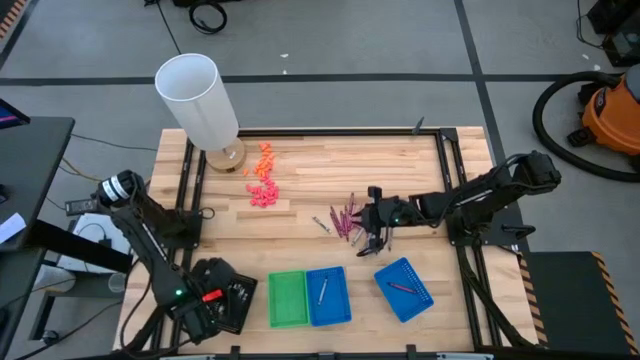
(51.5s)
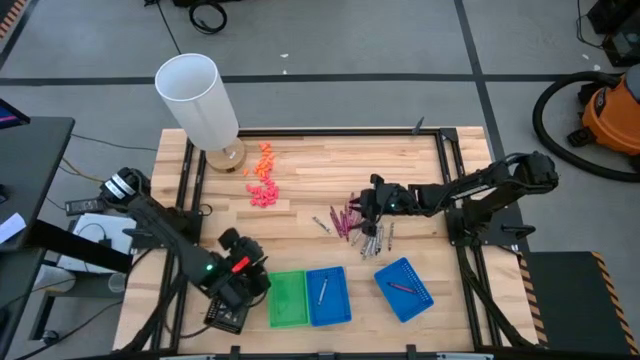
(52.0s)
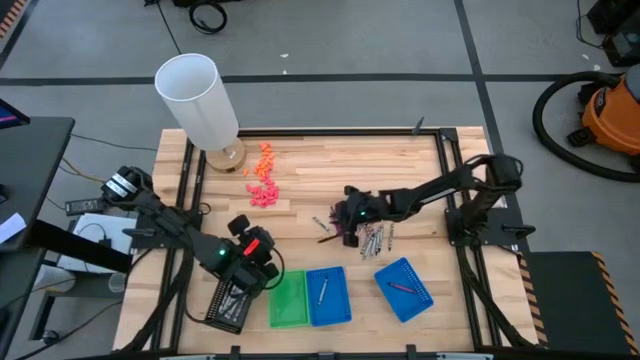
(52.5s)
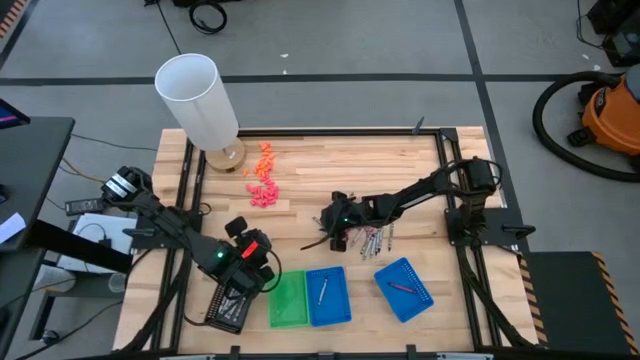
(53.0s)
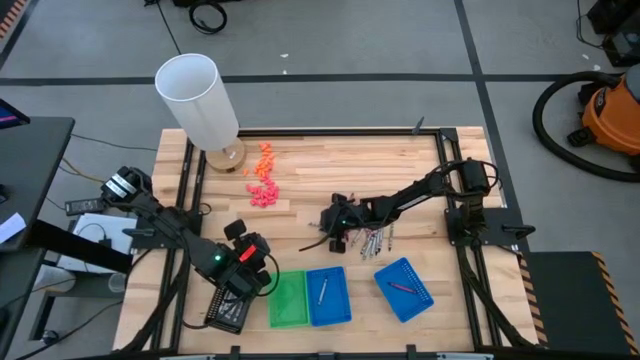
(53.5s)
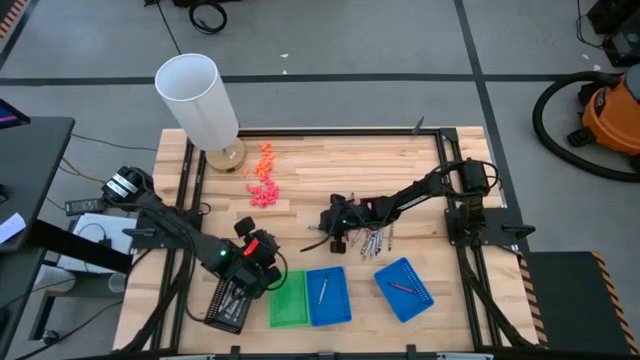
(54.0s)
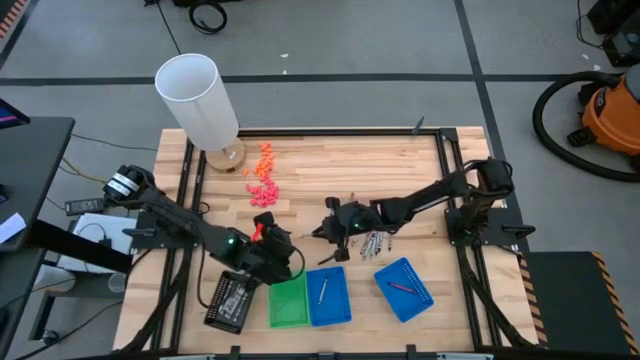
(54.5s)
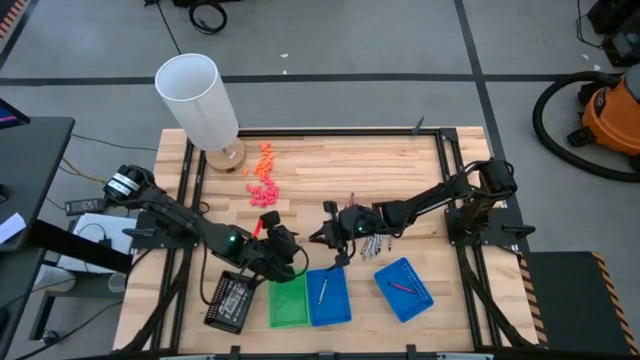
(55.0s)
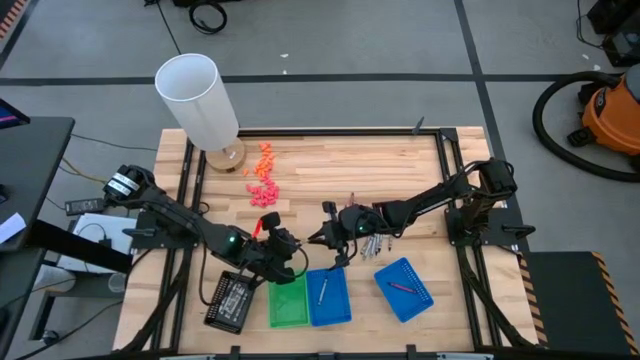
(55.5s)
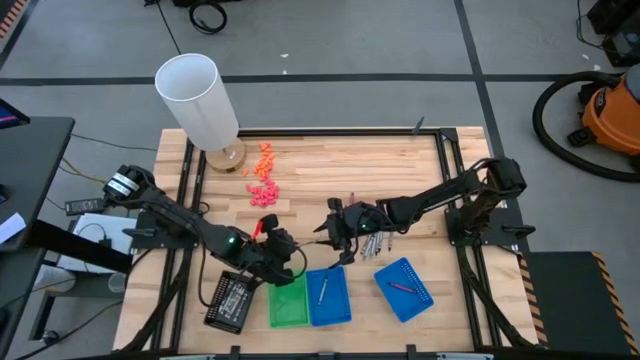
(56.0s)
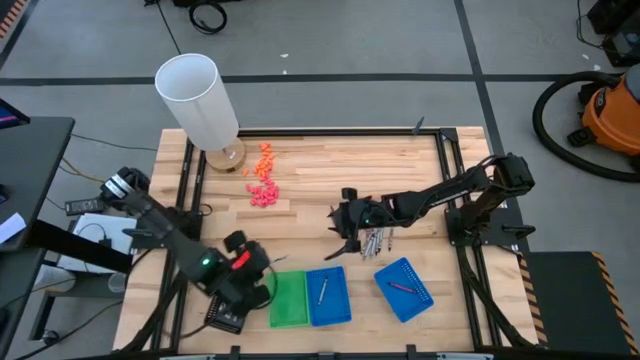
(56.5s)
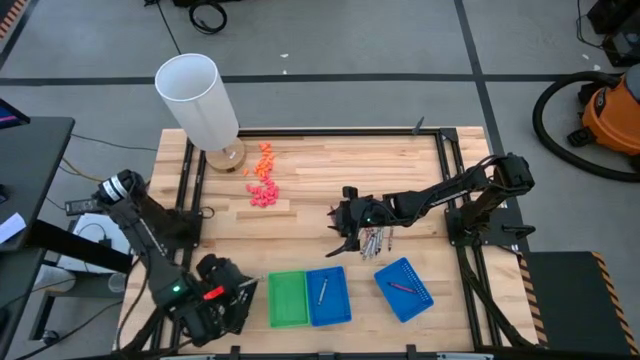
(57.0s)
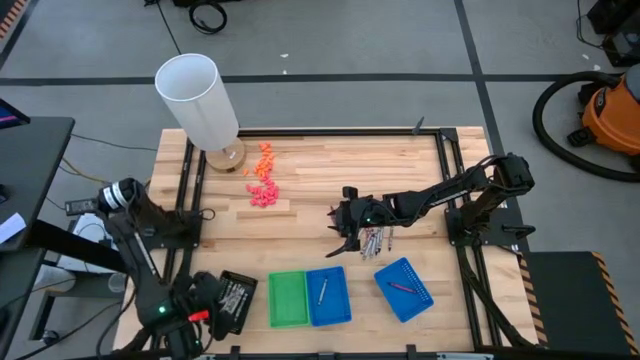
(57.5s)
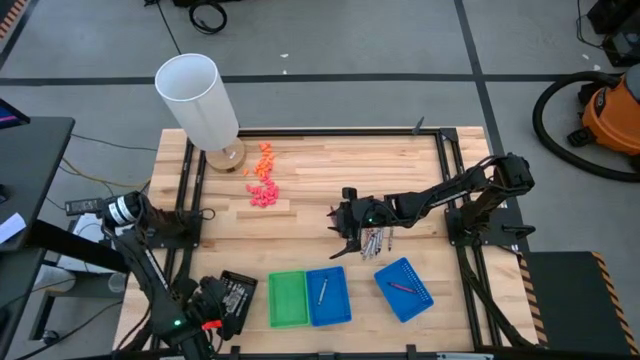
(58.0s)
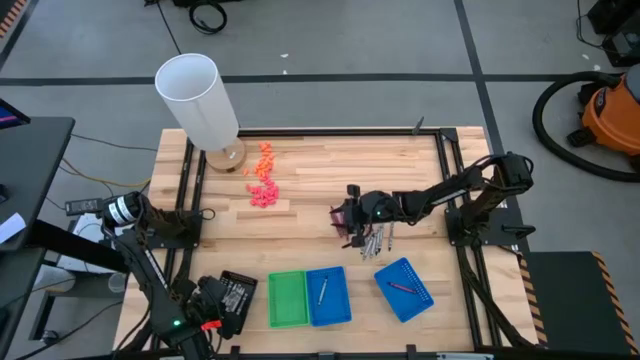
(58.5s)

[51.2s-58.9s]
Task: Sort crayons
Put the white crayon into the black bin

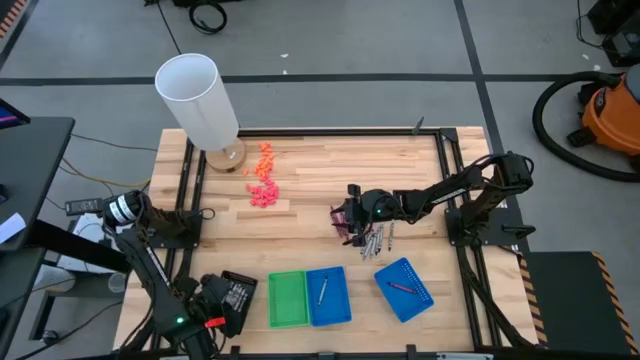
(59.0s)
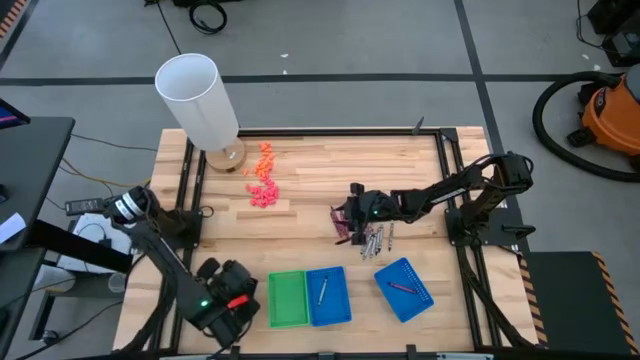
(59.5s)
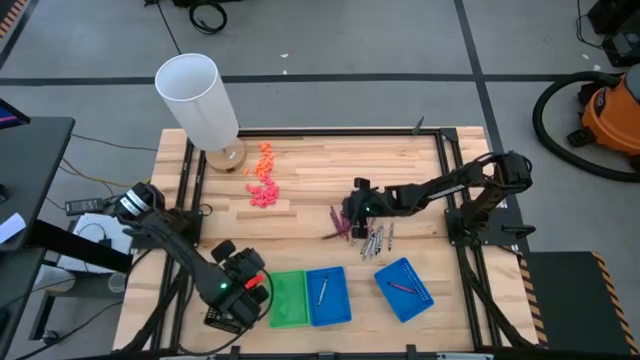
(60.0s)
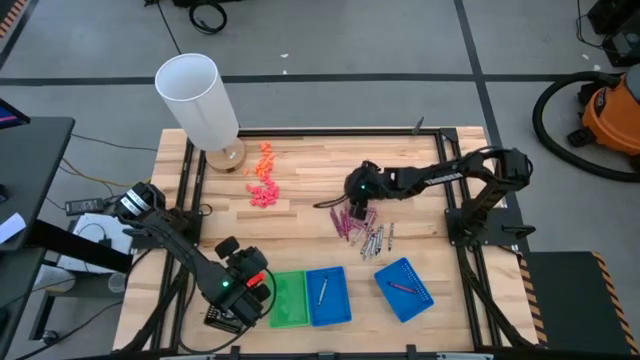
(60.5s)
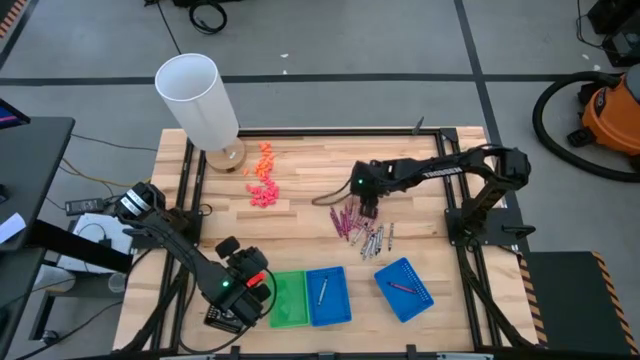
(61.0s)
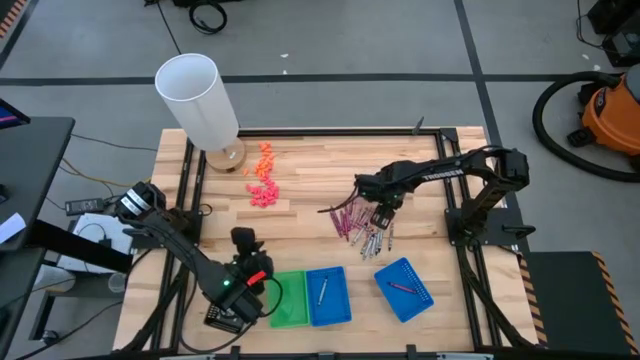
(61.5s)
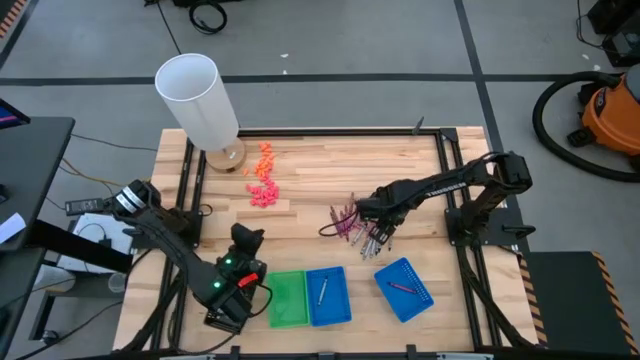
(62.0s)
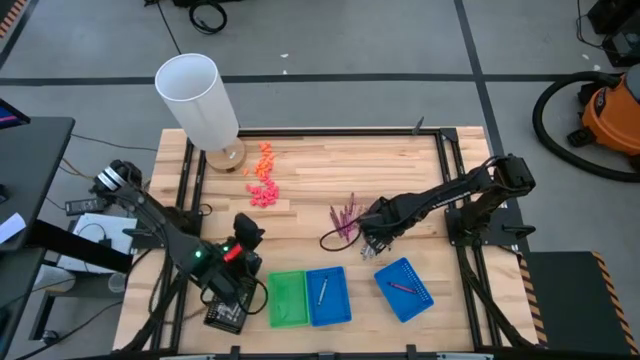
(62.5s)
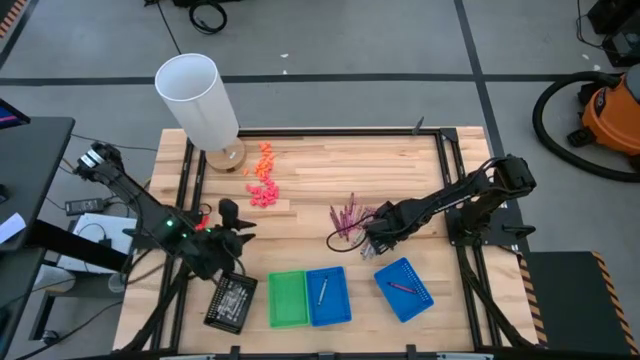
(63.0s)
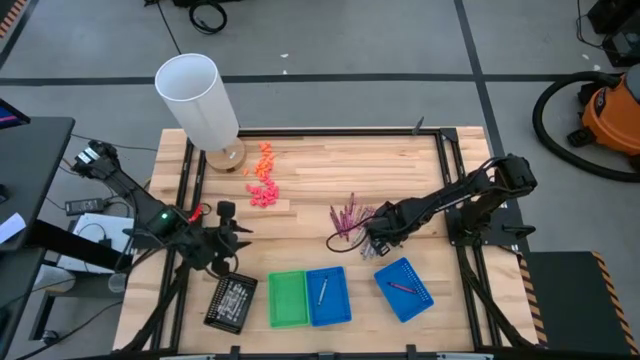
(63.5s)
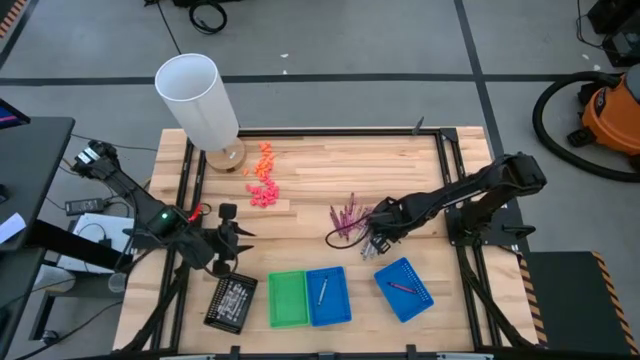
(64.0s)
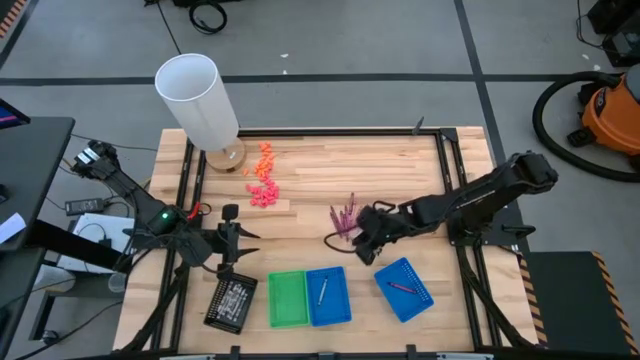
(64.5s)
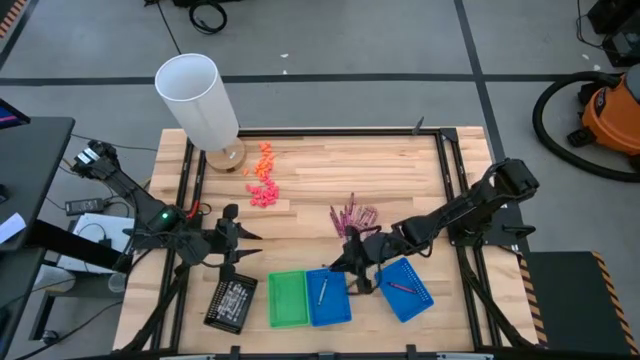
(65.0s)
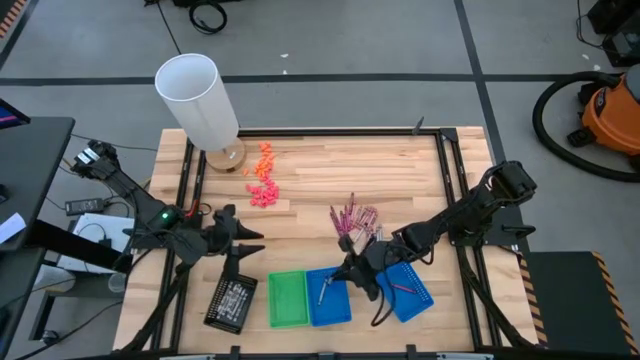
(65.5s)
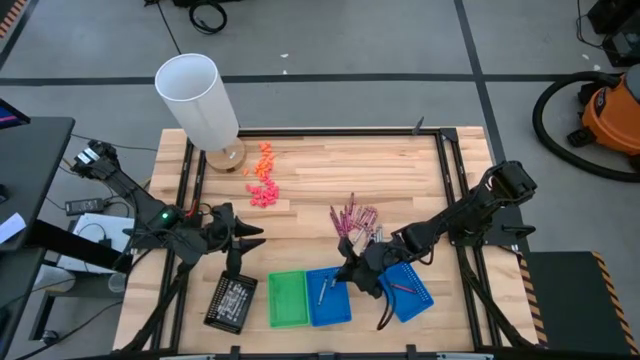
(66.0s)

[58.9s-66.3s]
Put the black crayon into the left blue bin

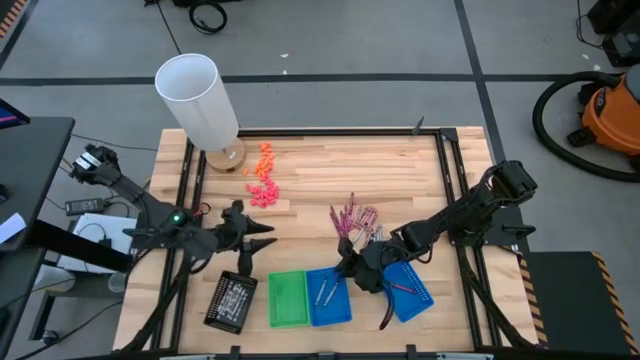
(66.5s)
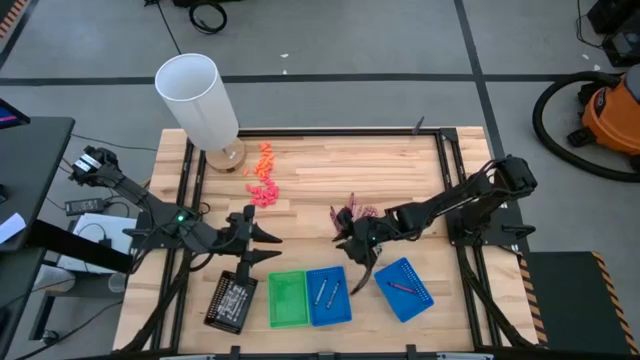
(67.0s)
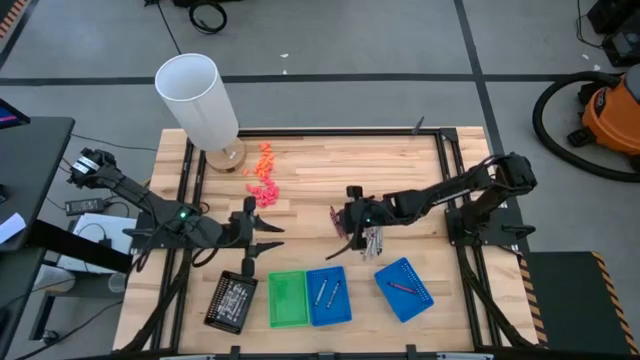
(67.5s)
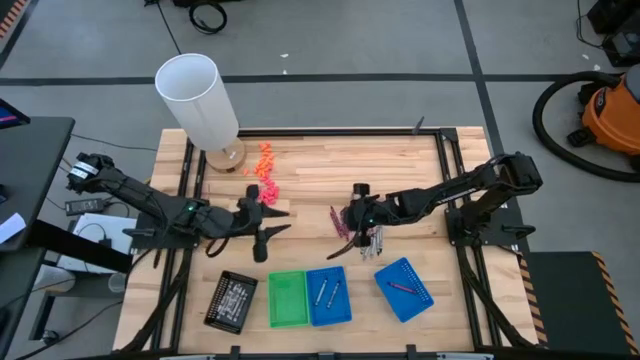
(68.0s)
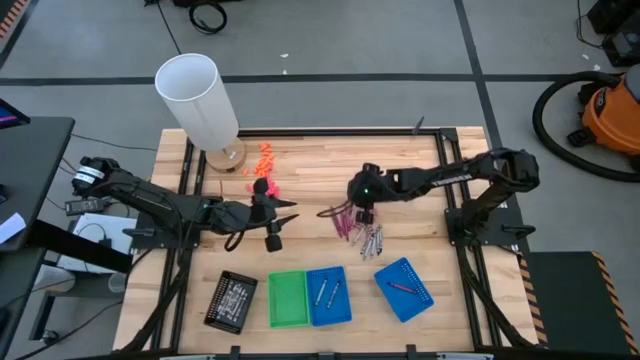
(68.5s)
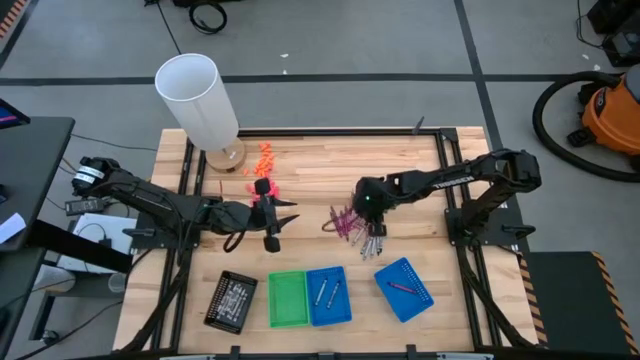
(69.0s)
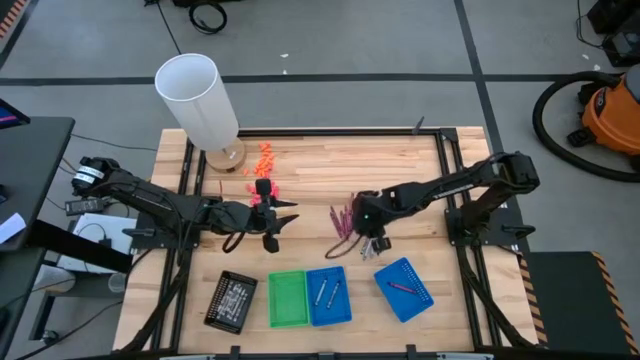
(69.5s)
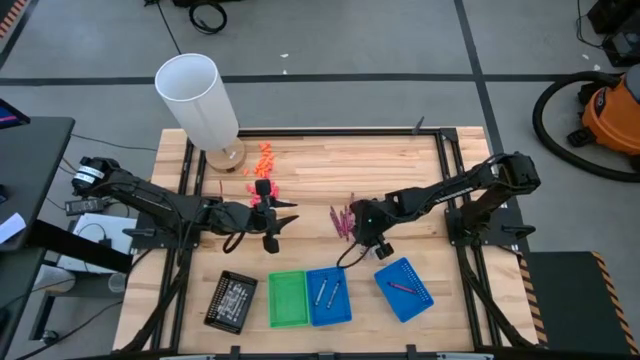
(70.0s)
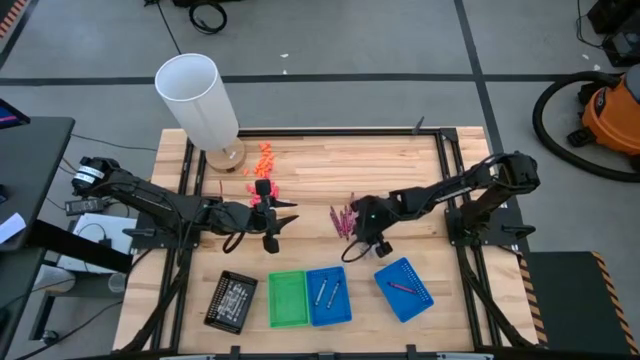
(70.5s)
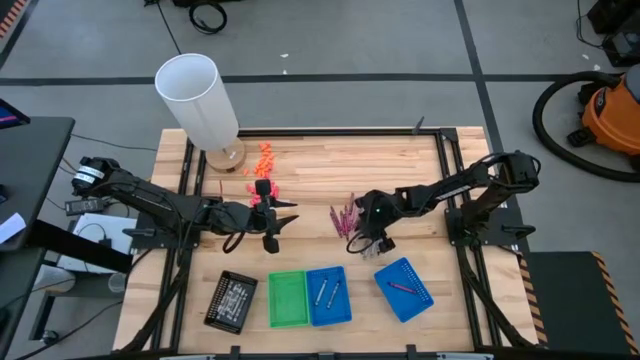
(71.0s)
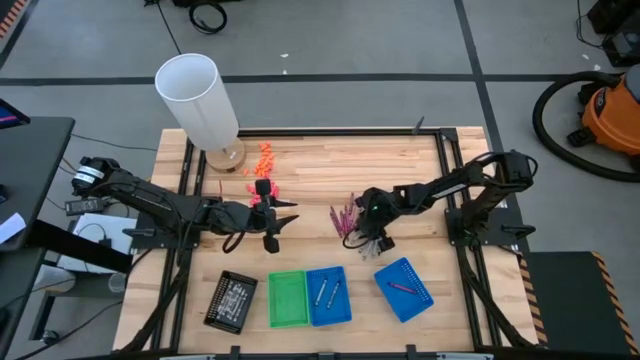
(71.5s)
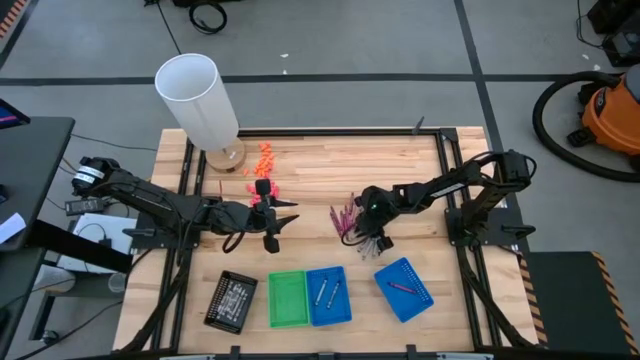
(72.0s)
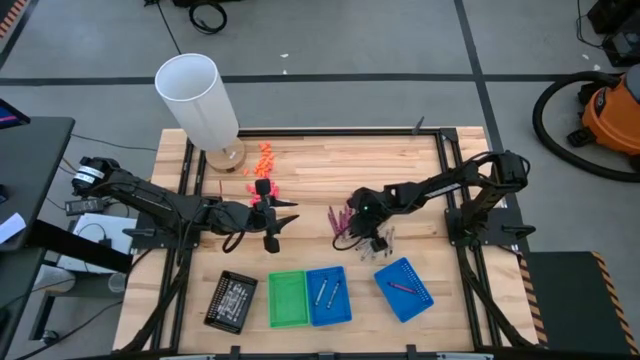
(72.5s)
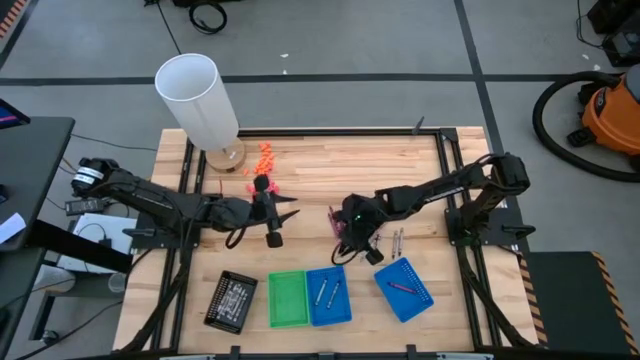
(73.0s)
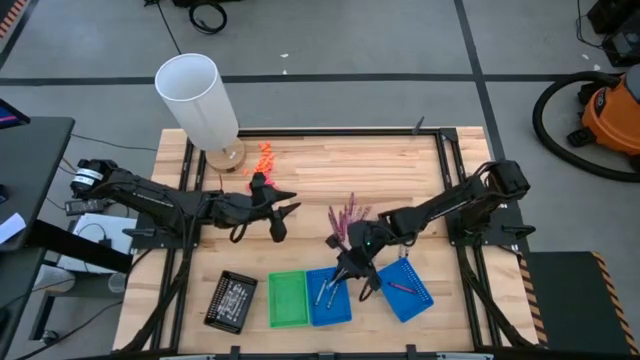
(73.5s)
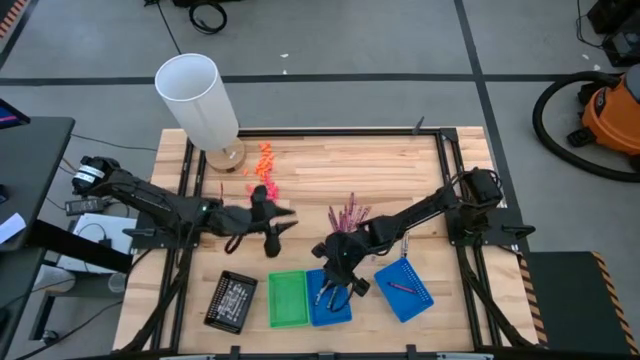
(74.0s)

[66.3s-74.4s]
Put the black crayon into the left blue bin
